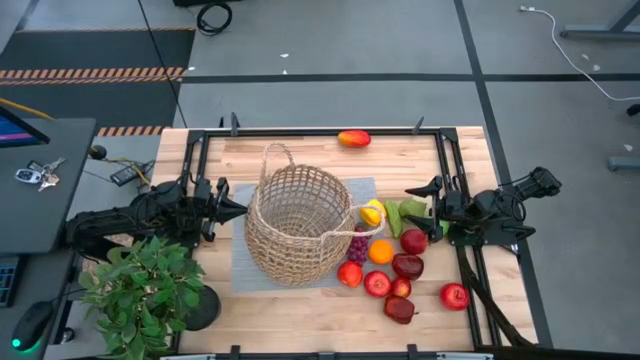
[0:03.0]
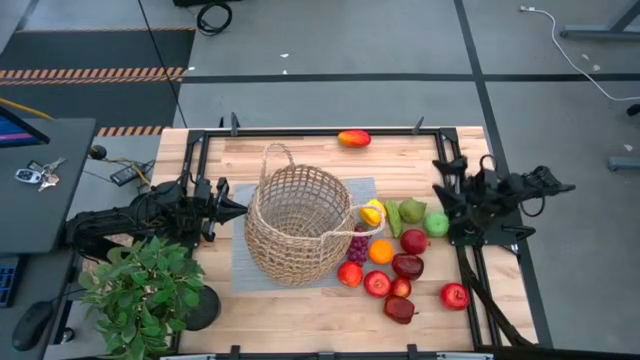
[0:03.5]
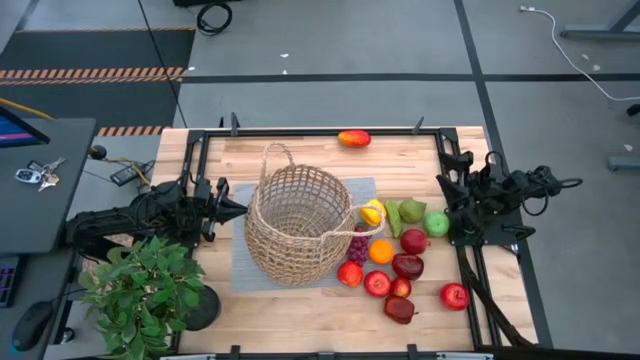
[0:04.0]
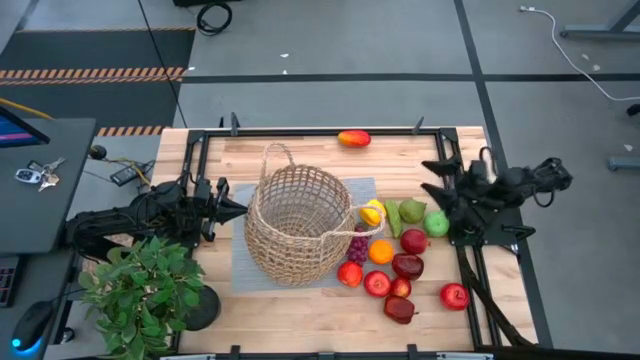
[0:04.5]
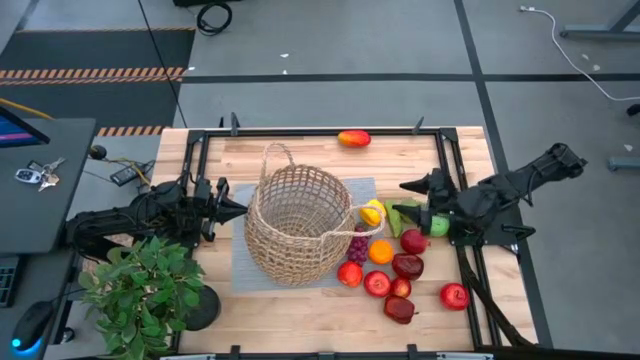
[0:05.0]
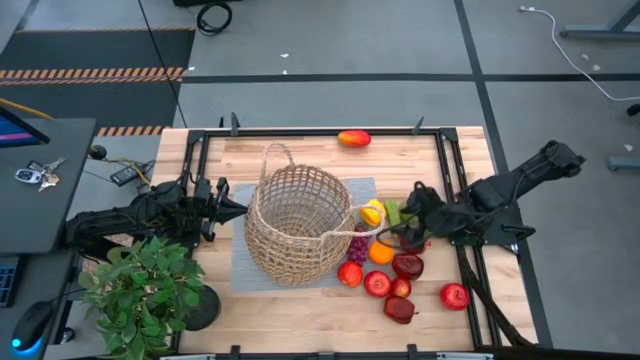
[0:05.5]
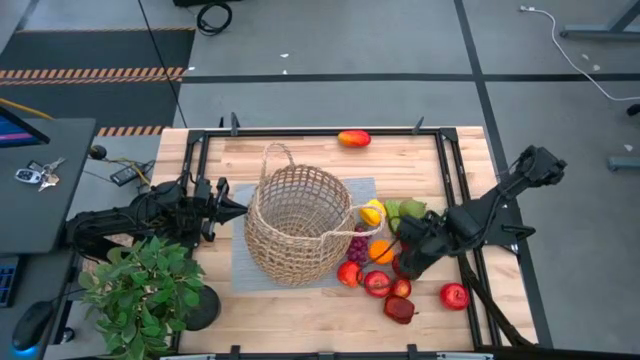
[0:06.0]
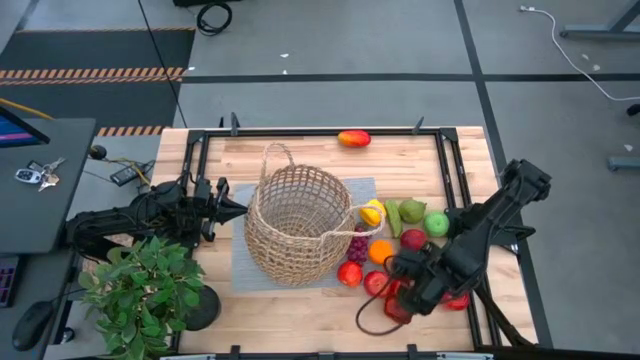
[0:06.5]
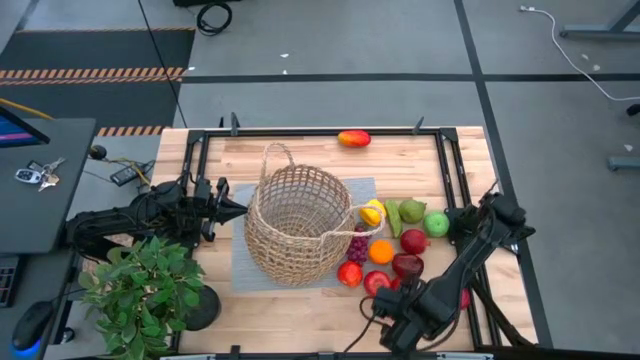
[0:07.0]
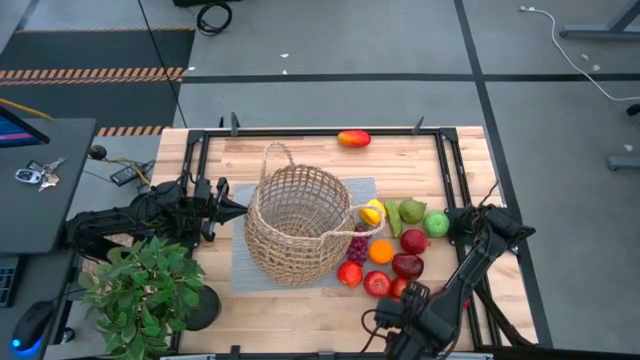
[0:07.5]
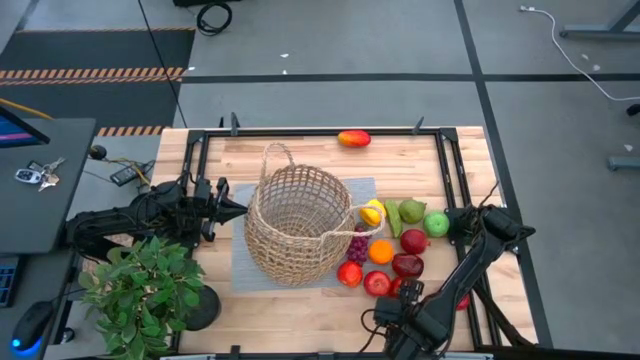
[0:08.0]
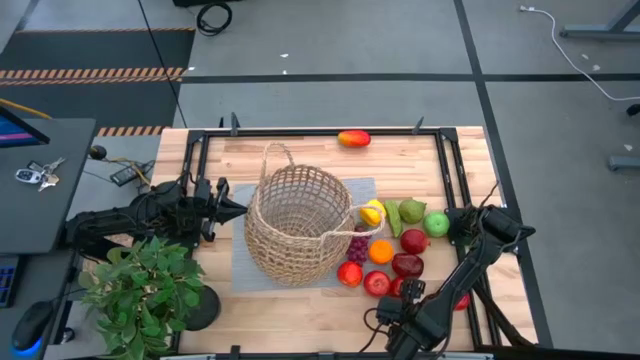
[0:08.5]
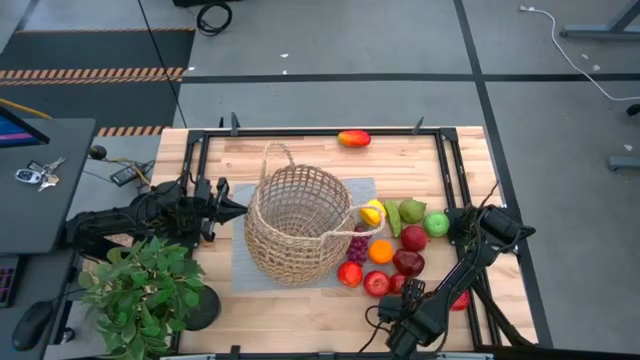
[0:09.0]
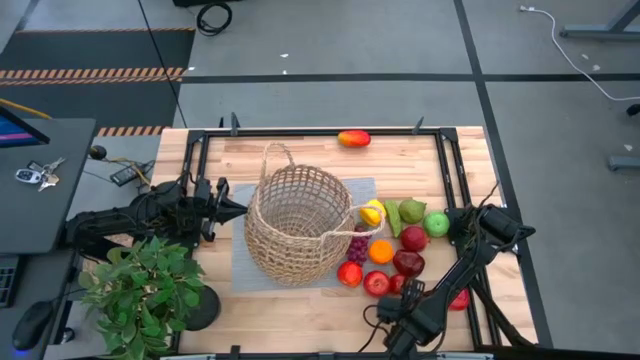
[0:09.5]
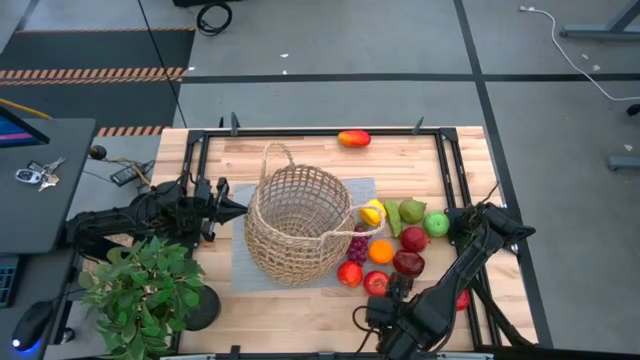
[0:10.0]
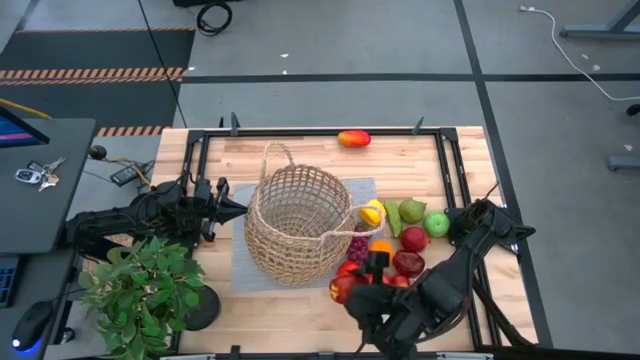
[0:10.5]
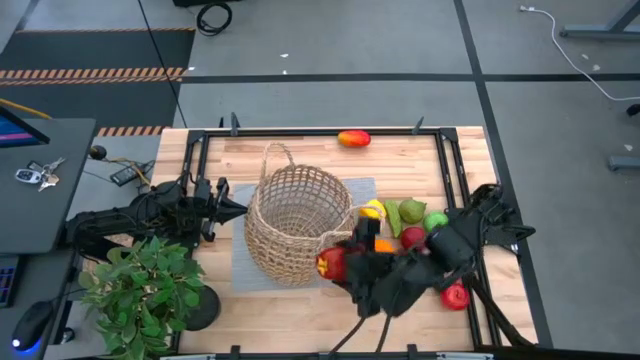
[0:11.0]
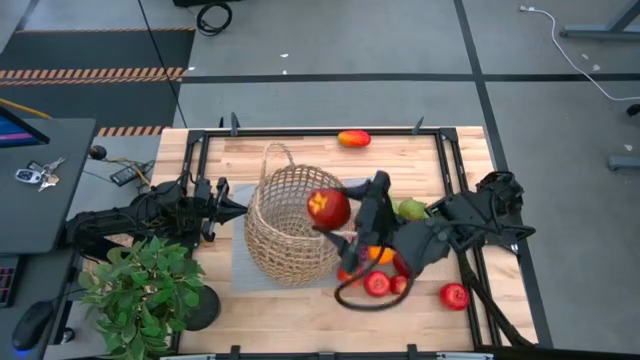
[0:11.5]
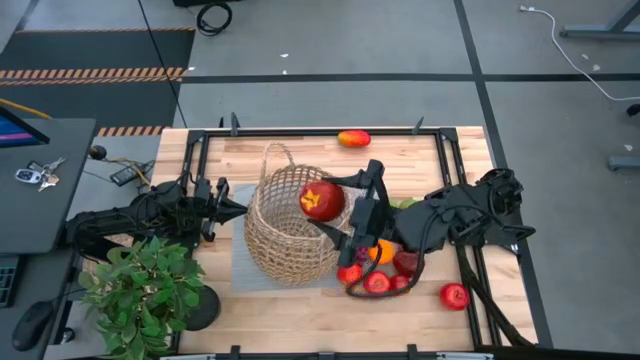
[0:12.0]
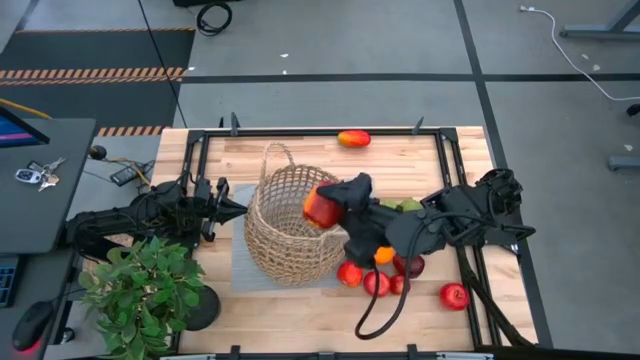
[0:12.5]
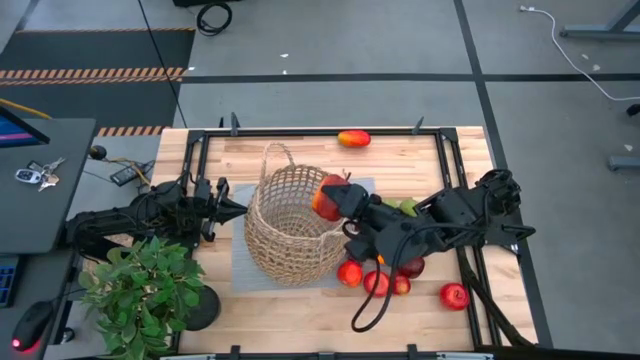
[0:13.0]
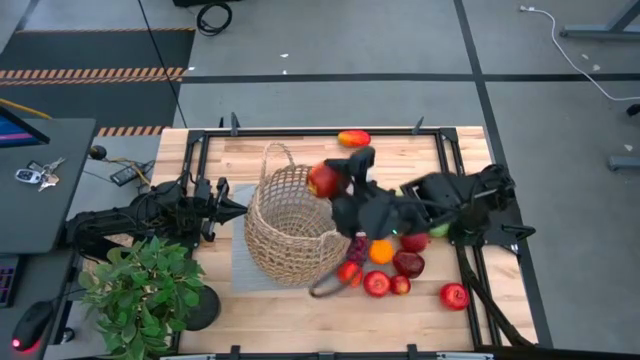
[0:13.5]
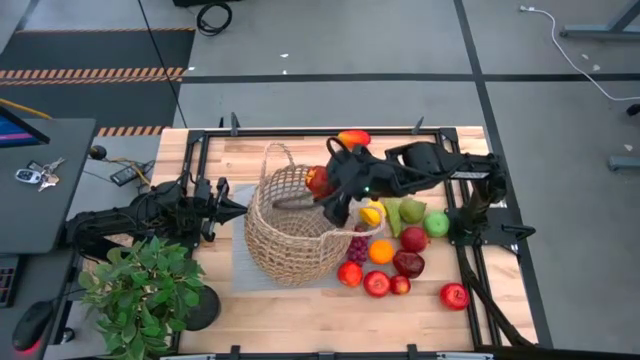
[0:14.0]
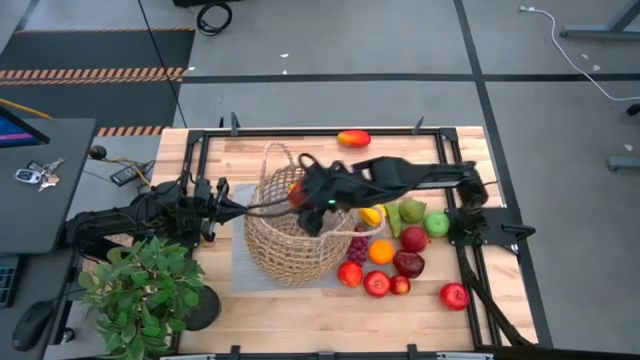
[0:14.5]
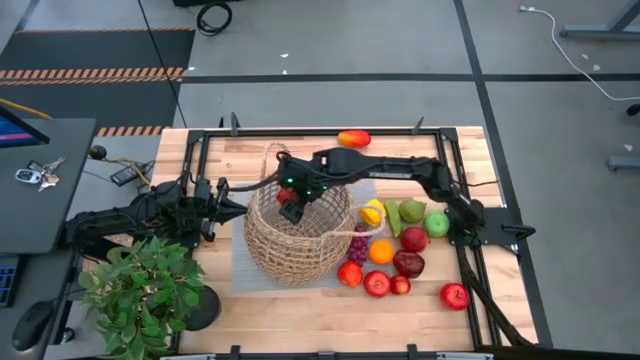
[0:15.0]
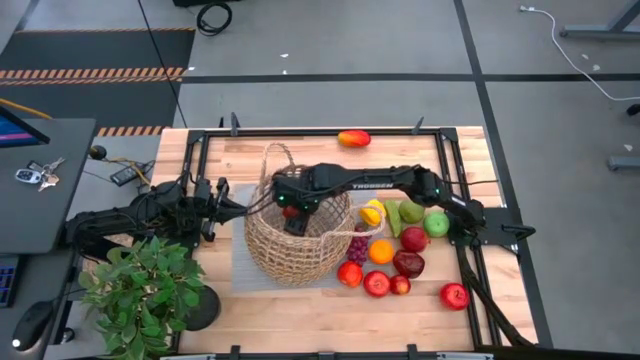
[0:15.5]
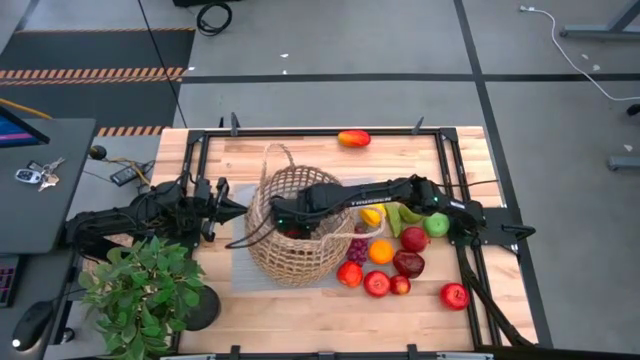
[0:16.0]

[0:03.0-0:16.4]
Task: Build produce basket
Put the bottom dark red apple into the basket
